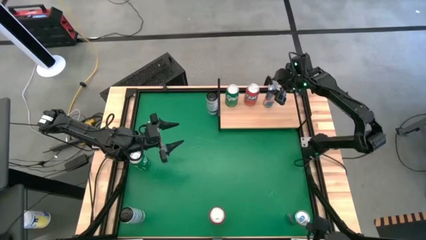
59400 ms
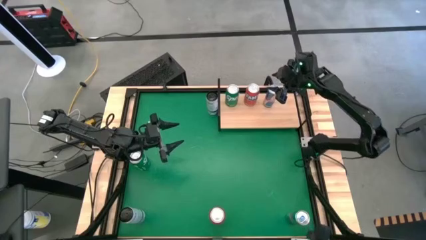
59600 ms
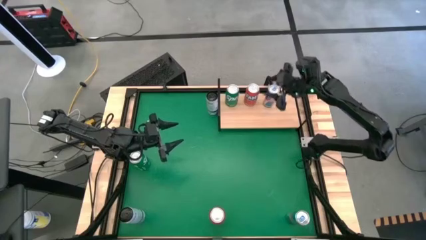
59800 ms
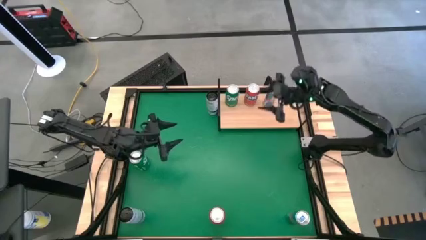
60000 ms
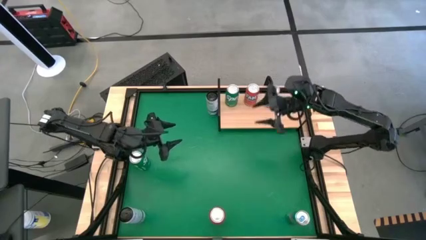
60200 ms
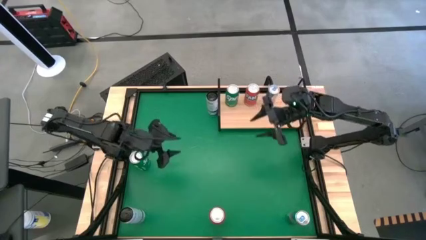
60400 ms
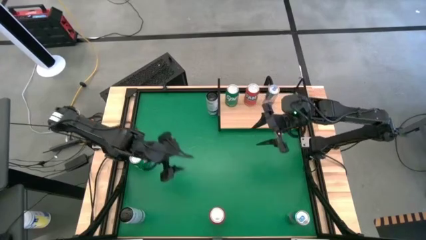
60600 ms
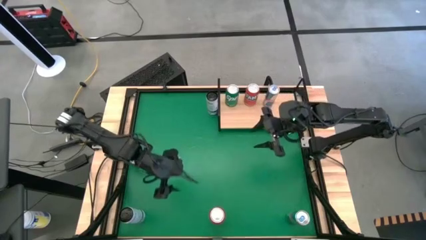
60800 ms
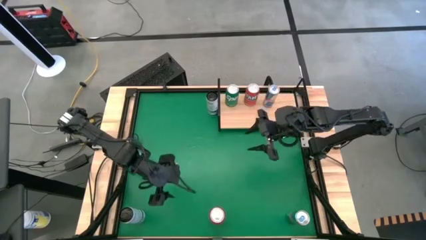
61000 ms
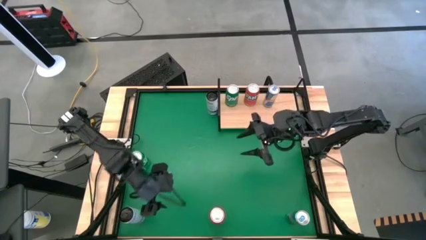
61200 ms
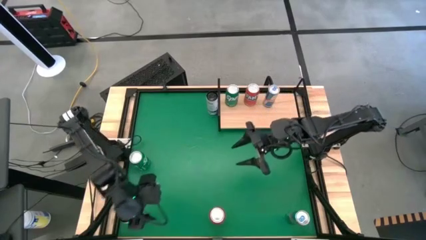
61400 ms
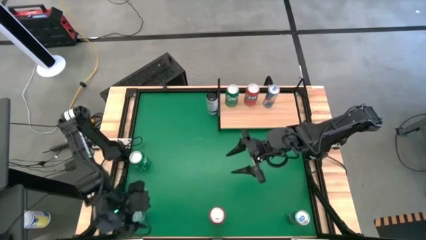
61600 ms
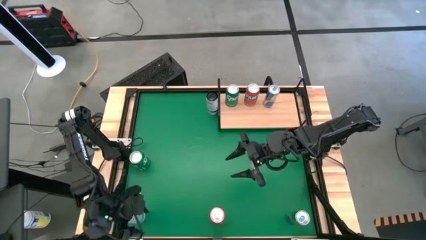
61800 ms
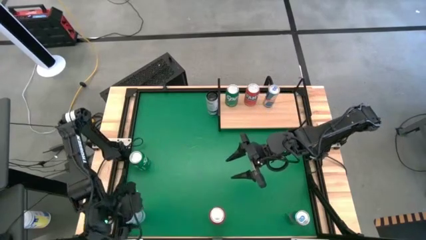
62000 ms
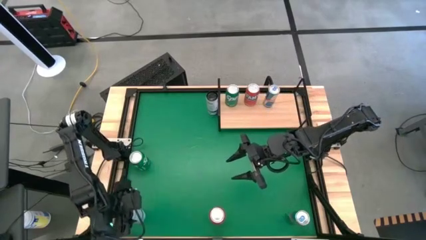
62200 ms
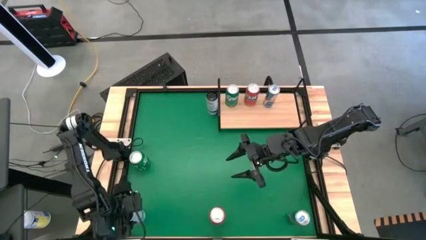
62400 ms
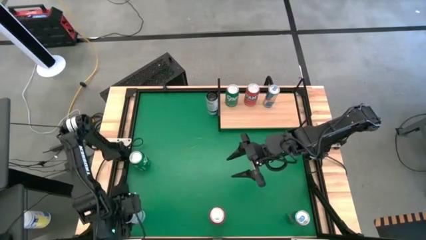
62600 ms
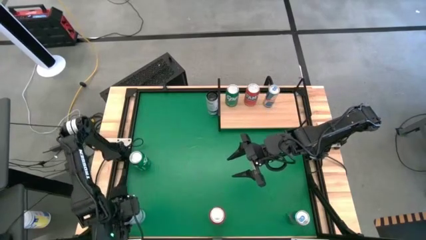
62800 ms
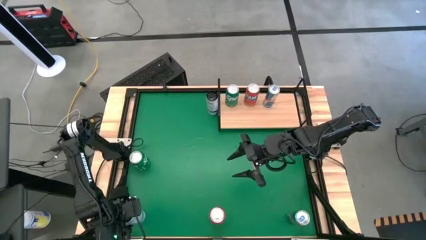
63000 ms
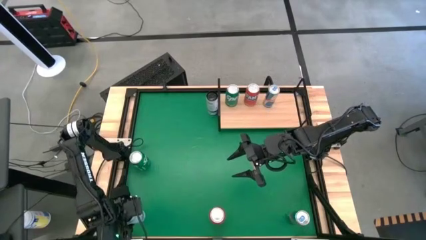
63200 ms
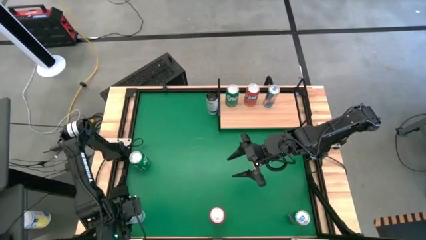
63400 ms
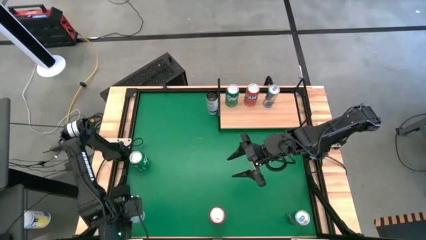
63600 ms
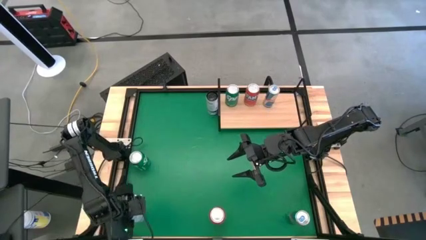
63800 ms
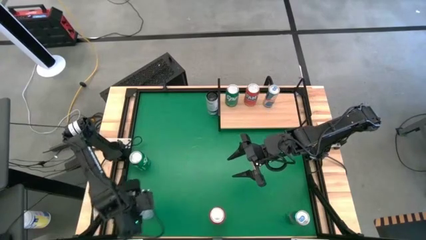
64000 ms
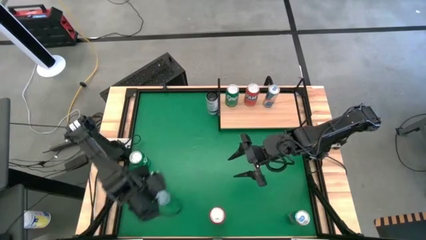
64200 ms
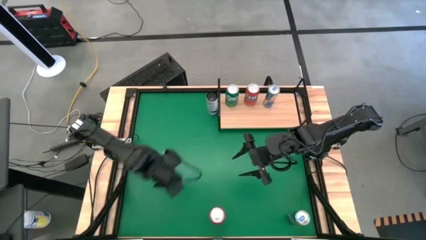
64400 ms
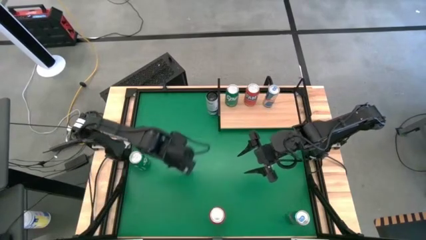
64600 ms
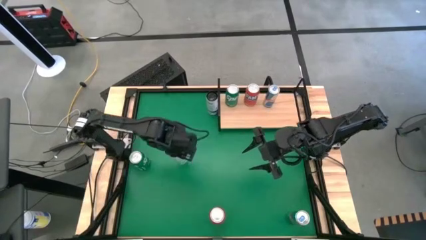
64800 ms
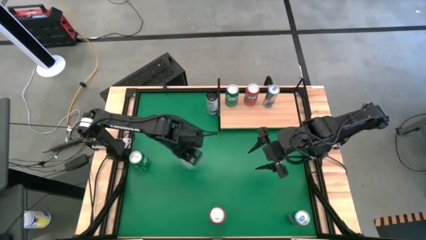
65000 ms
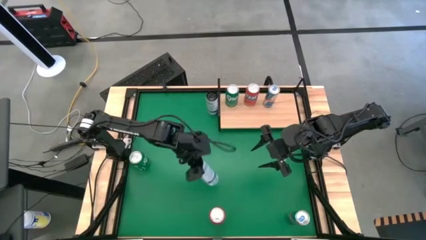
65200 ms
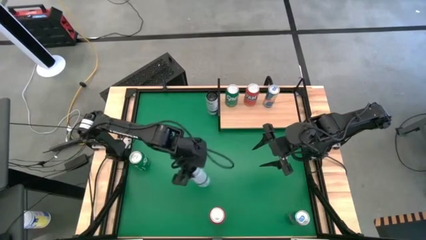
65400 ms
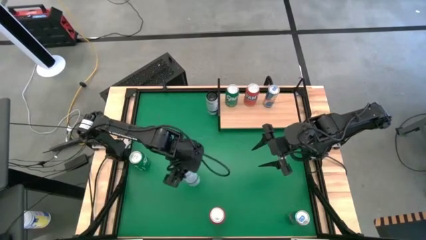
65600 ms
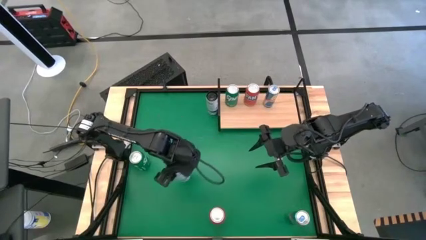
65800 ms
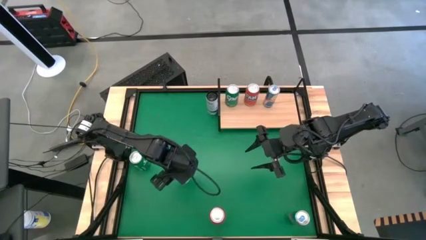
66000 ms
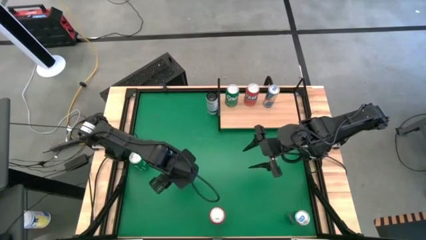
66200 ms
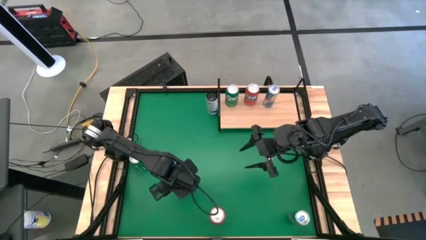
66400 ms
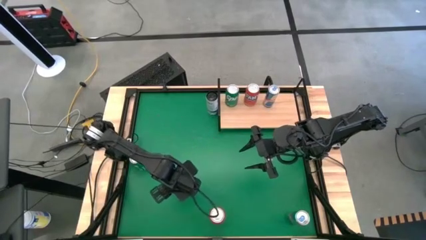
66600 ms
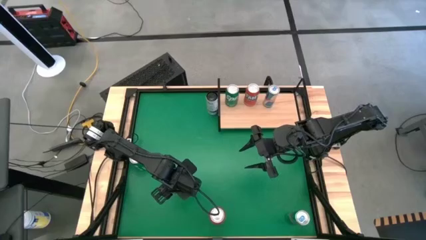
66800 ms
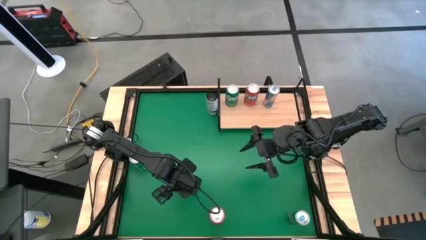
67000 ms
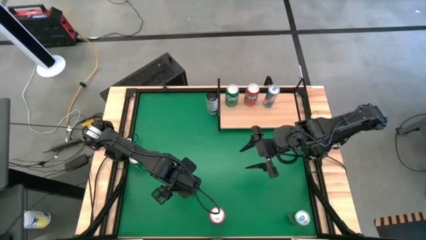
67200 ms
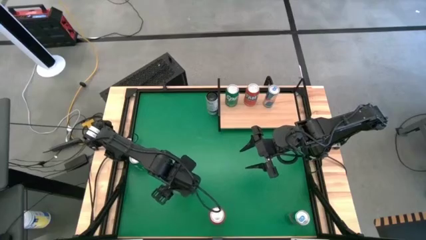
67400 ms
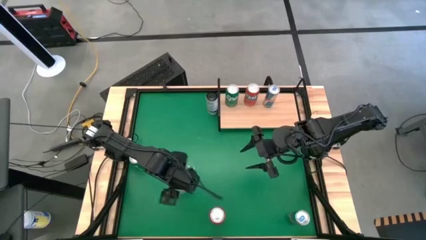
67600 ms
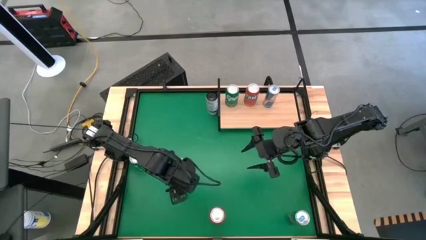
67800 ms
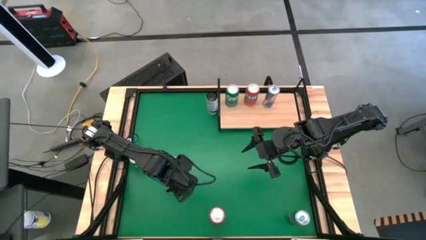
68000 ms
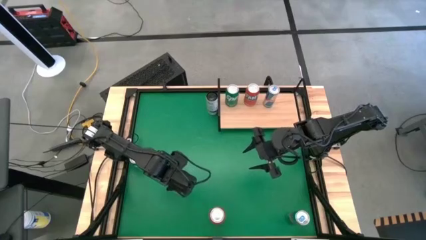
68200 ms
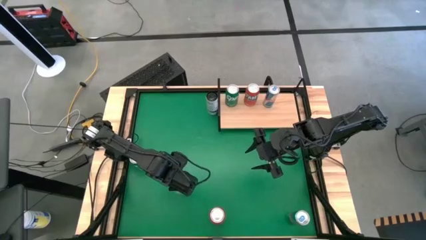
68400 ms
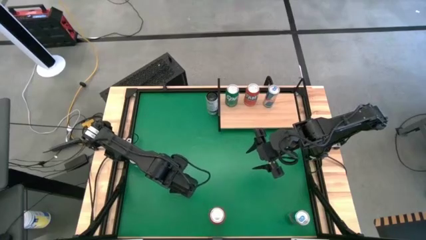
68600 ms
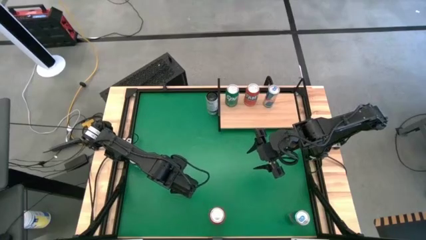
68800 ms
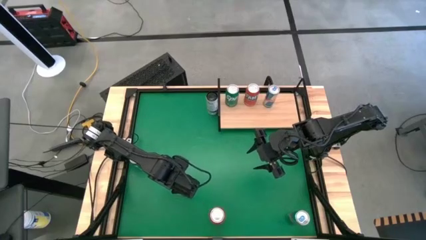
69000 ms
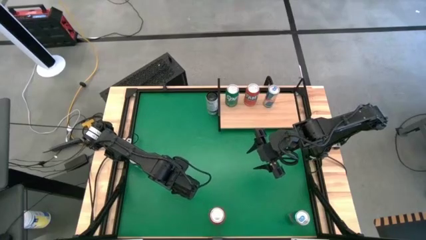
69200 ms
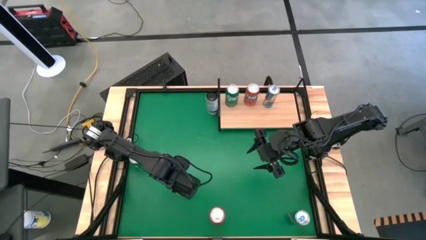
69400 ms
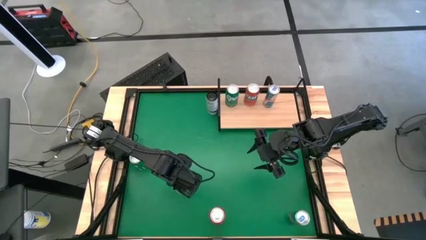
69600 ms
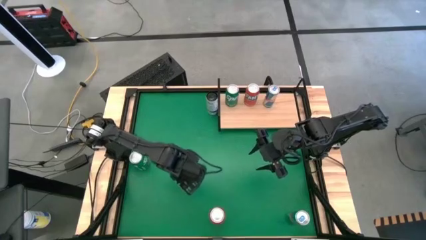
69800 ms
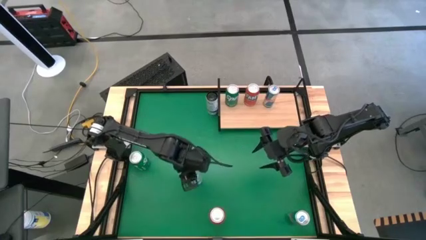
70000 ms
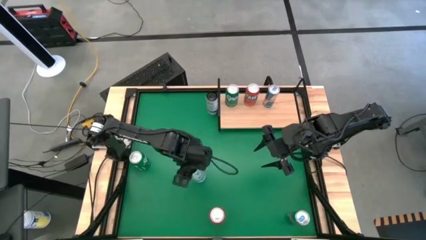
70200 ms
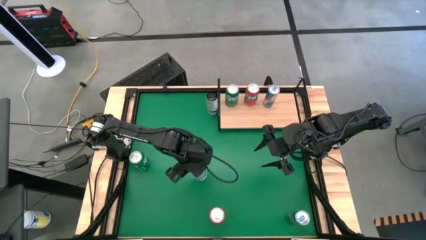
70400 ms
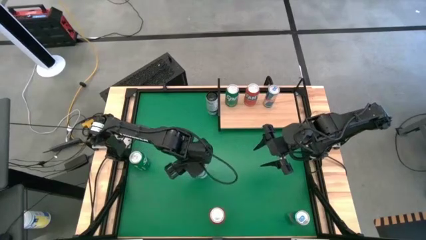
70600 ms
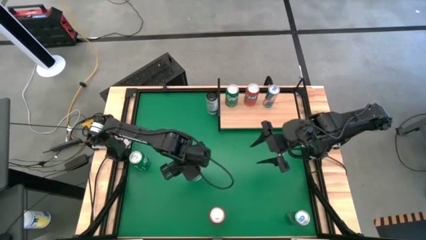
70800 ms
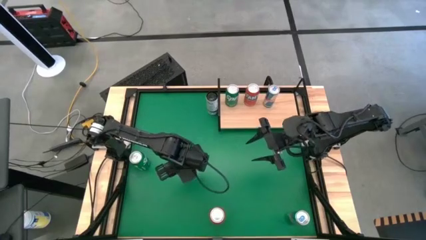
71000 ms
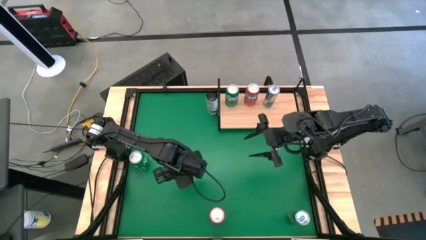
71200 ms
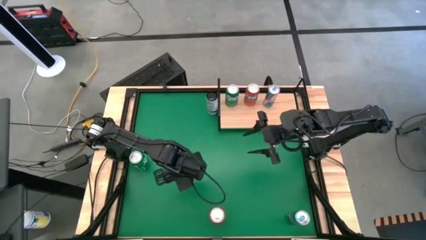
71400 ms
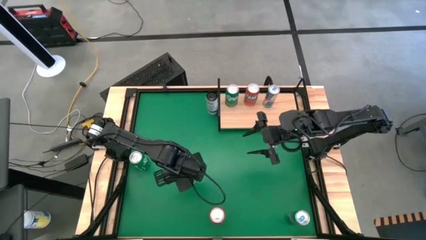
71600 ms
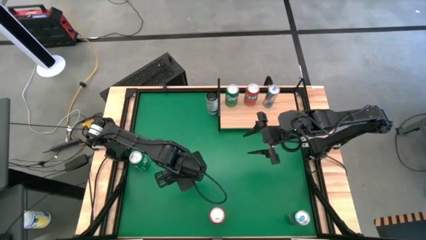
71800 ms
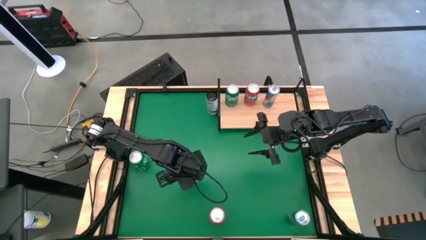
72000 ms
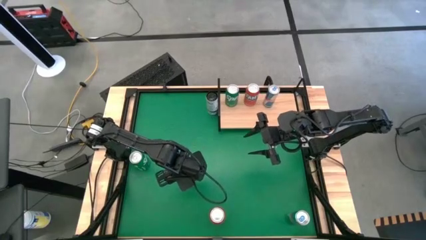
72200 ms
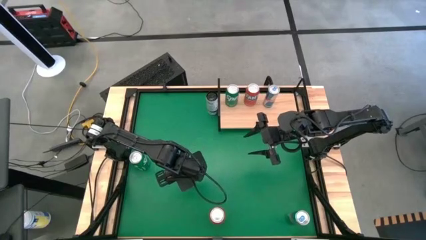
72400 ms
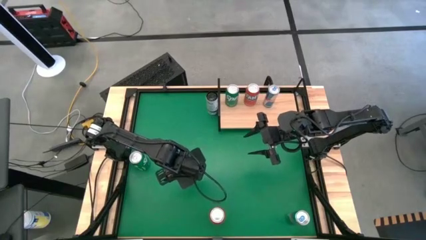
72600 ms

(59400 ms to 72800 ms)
Task: Place canned beverage on shelf
Put the bottom white and blue soda can on the shelf
